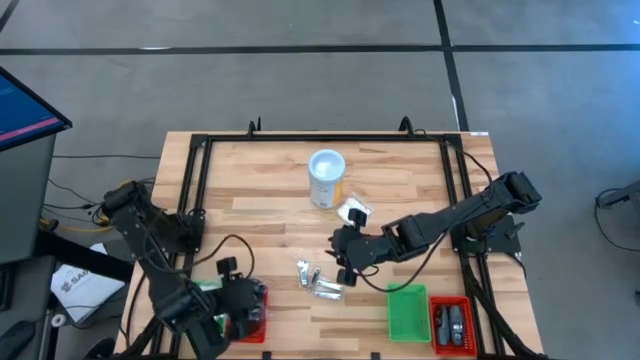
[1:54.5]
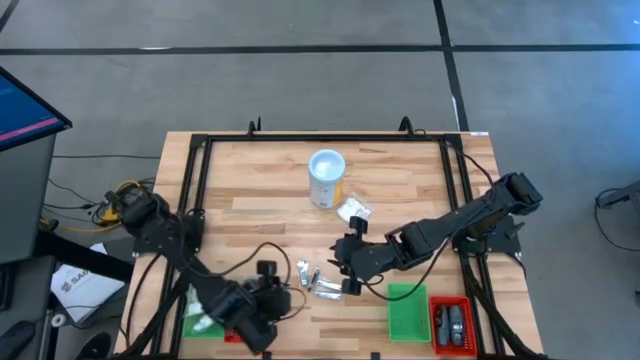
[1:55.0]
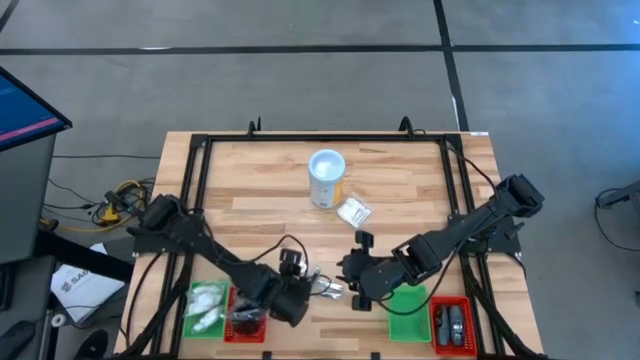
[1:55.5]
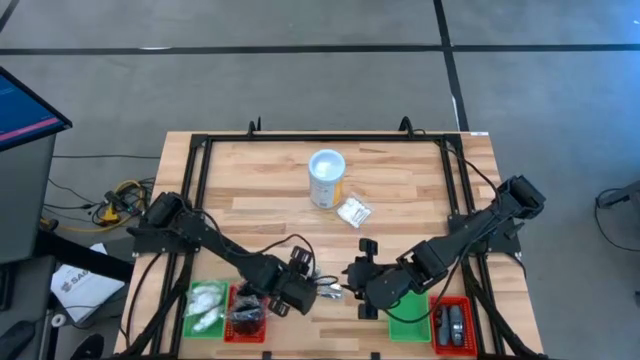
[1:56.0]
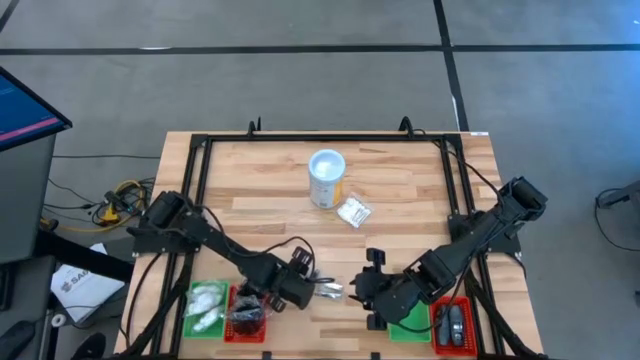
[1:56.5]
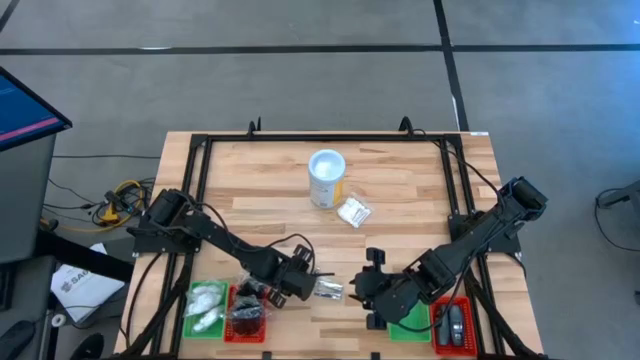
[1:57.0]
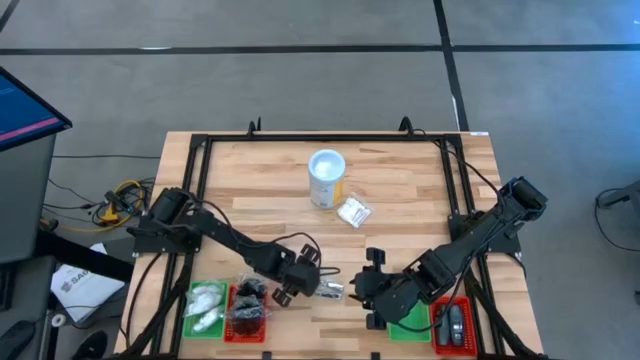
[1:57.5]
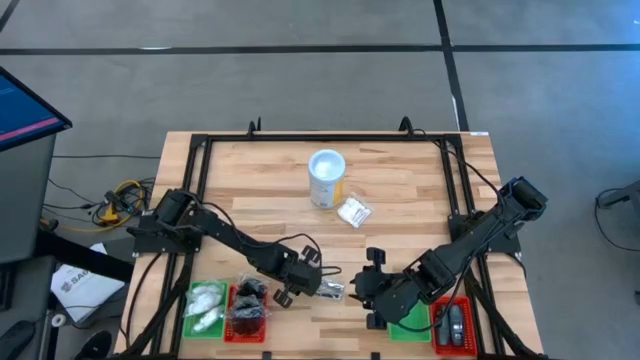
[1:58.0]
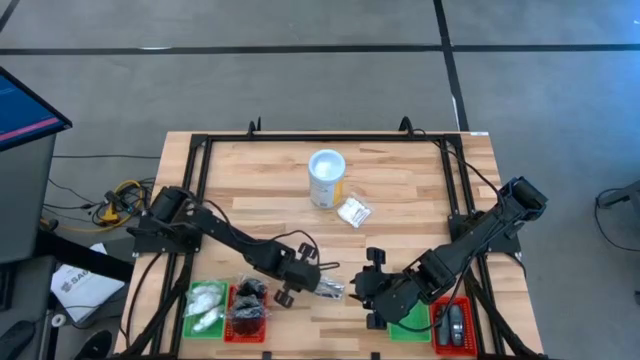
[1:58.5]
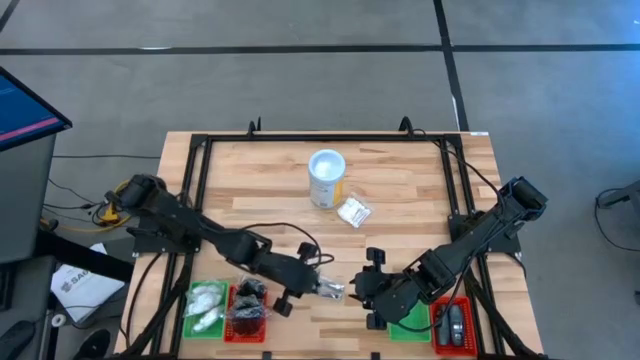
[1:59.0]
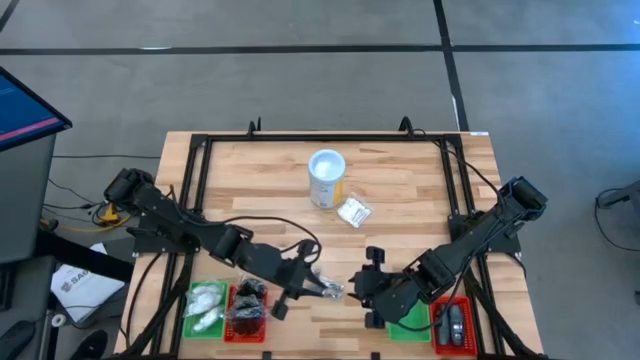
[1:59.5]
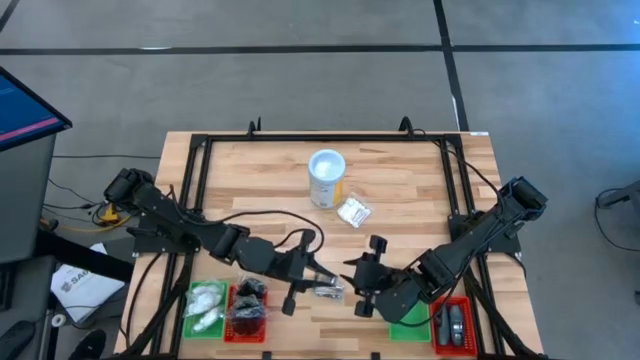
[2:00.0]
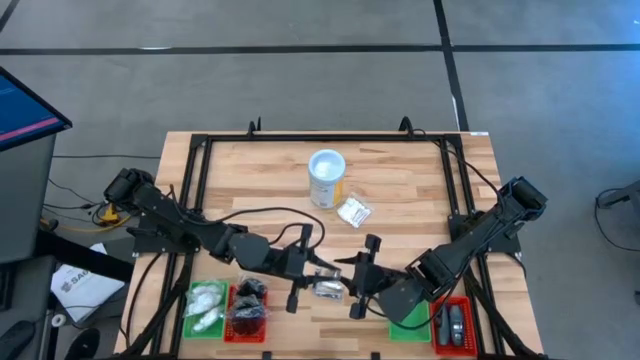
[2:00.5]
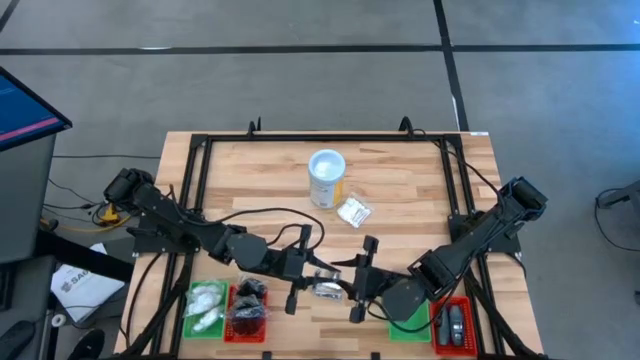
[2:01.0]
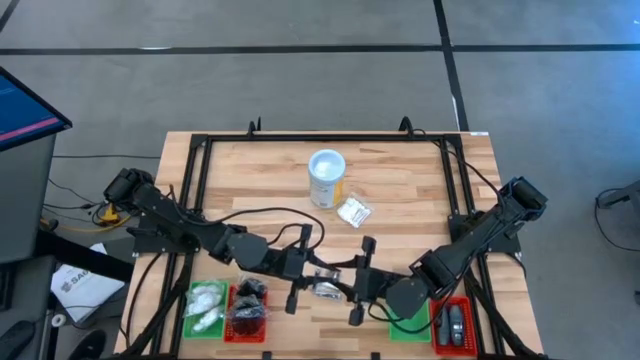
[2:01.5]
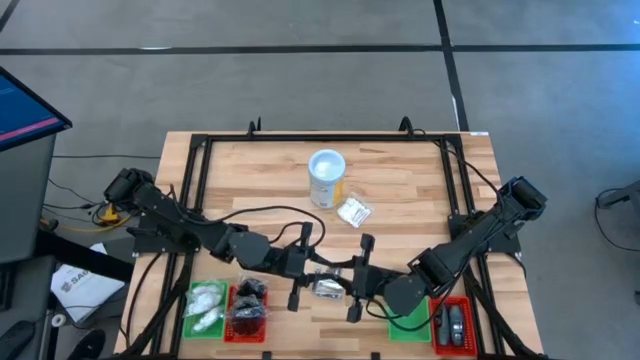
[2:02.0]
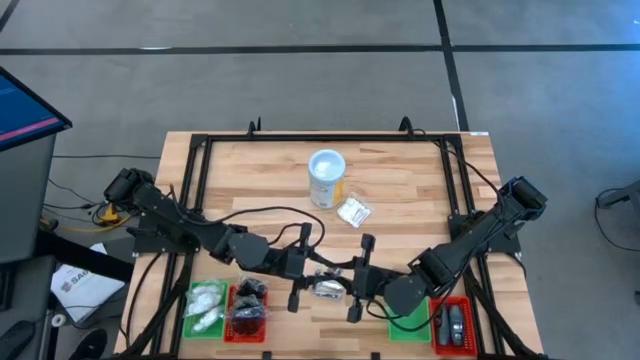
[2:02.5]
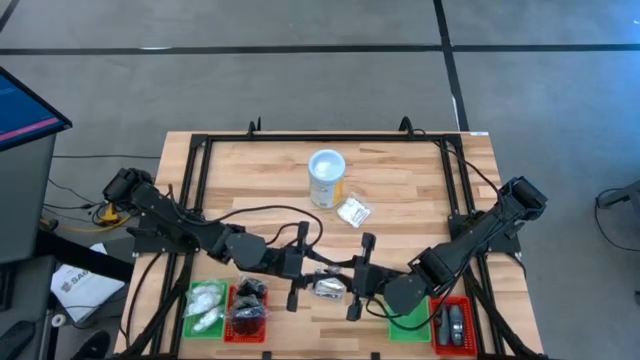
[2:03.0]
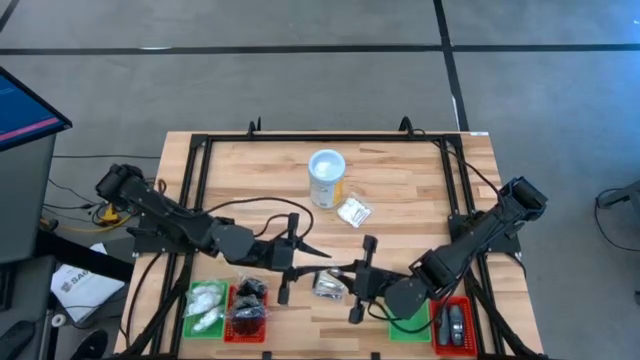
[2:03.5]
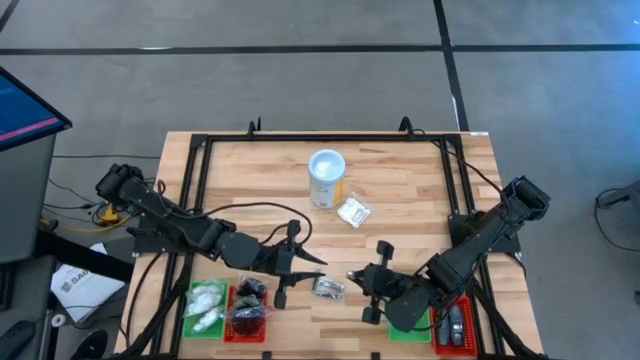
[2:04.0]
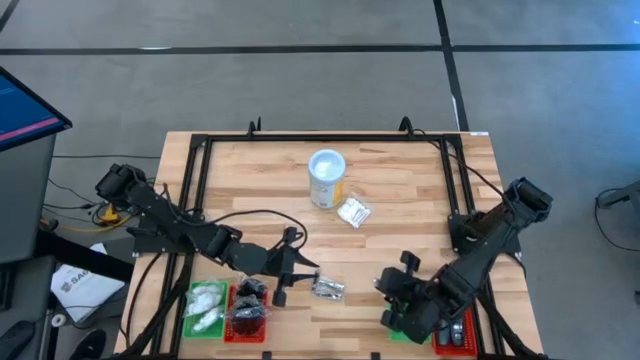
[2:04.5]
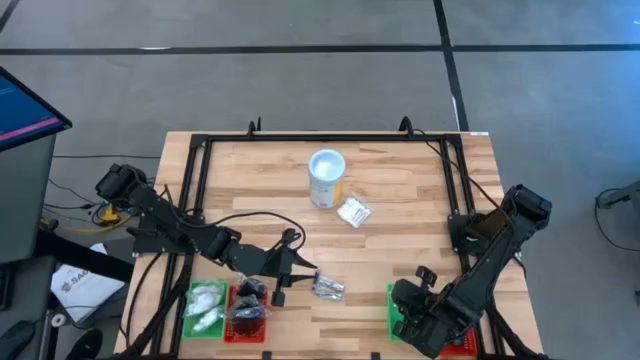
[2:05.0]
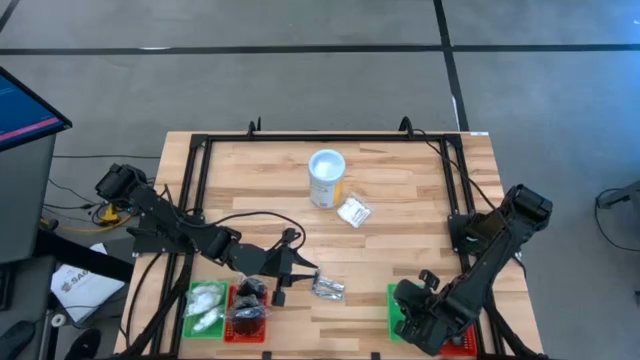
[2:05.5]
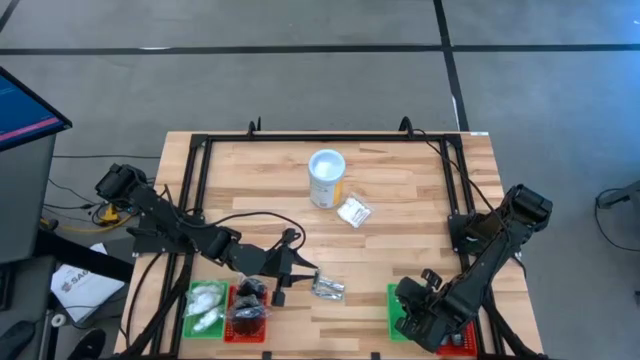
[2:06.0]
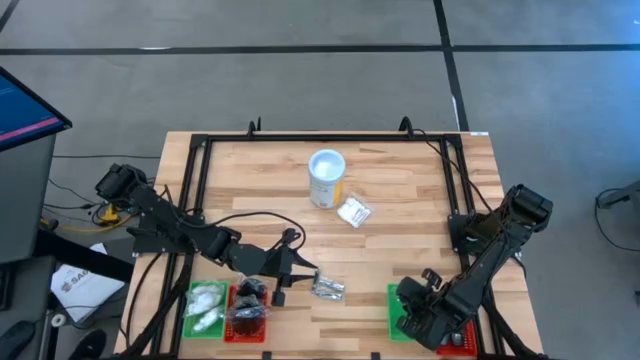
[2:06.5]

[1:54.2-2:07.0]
Task: Pick & Place Travel size toiletries
Put the nail cutter into the right green bin

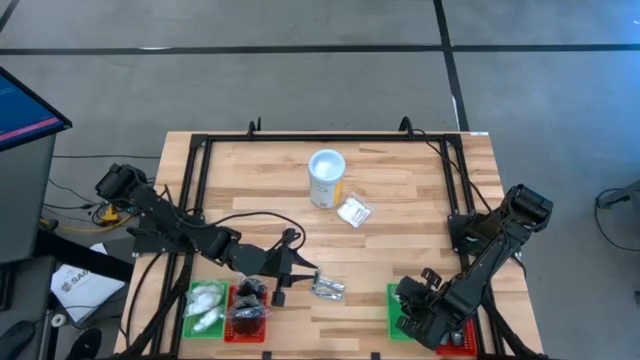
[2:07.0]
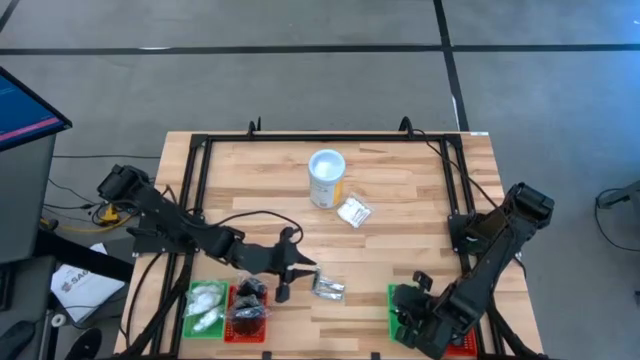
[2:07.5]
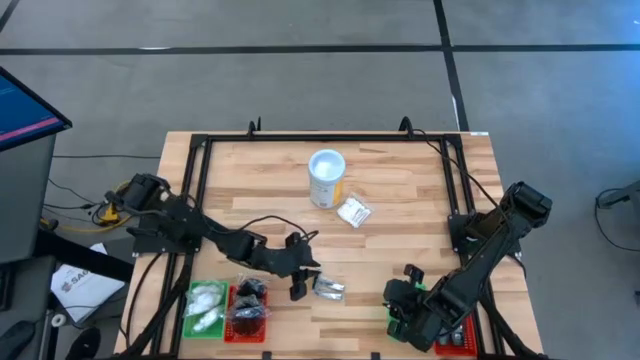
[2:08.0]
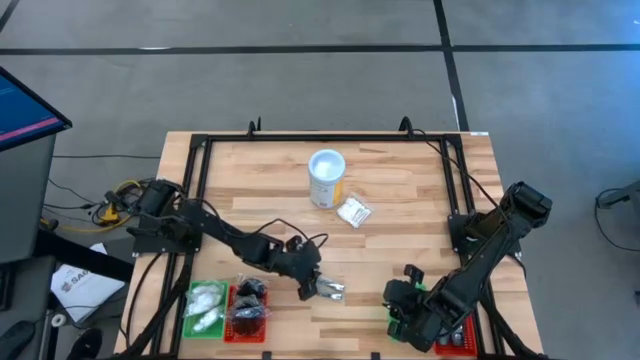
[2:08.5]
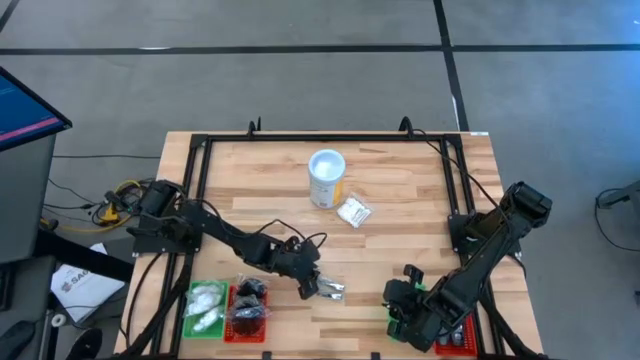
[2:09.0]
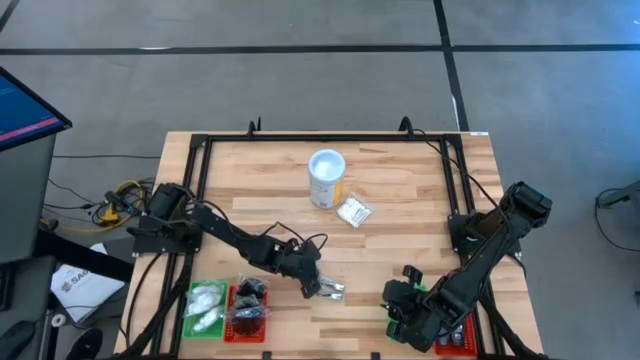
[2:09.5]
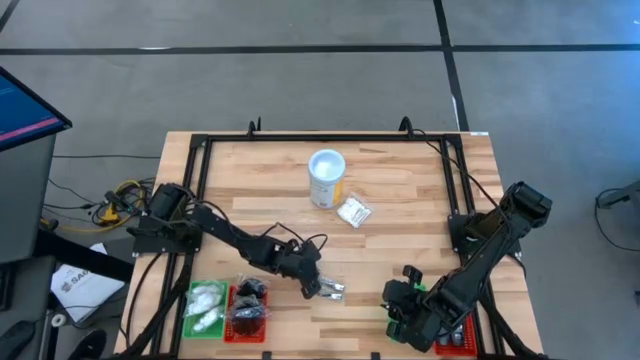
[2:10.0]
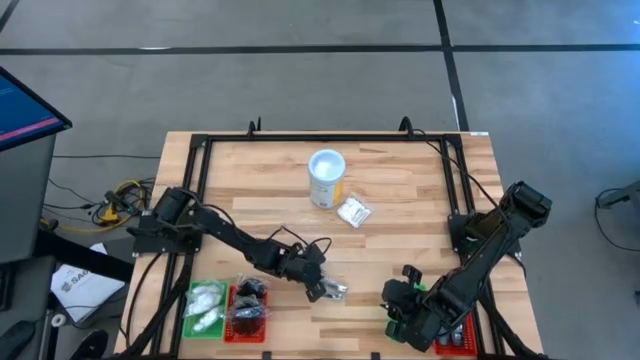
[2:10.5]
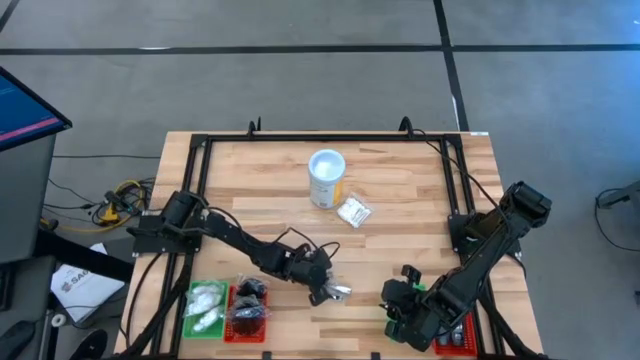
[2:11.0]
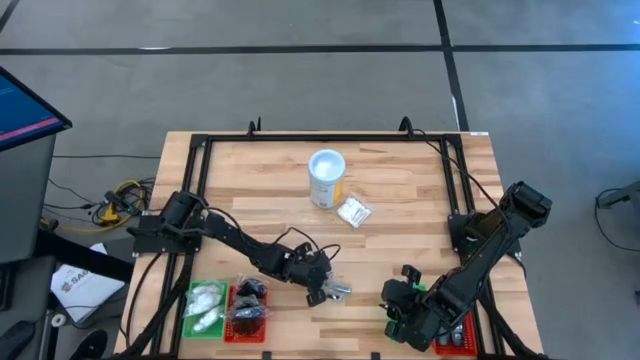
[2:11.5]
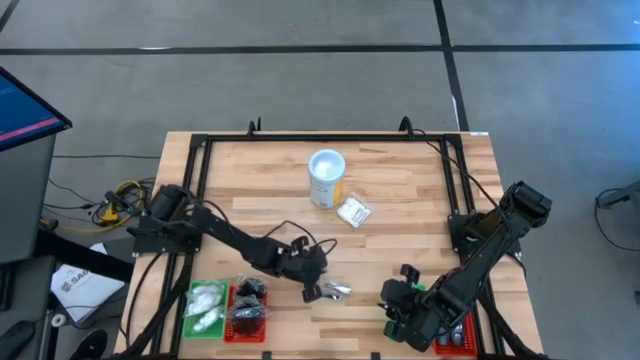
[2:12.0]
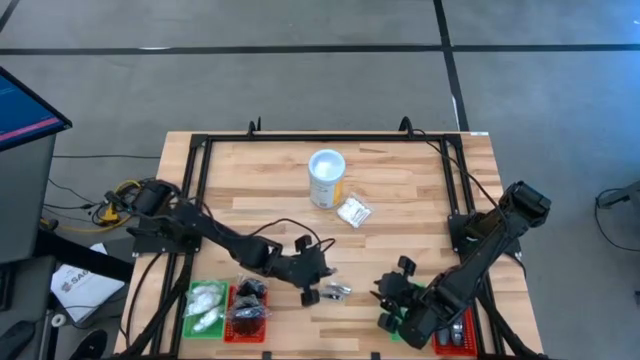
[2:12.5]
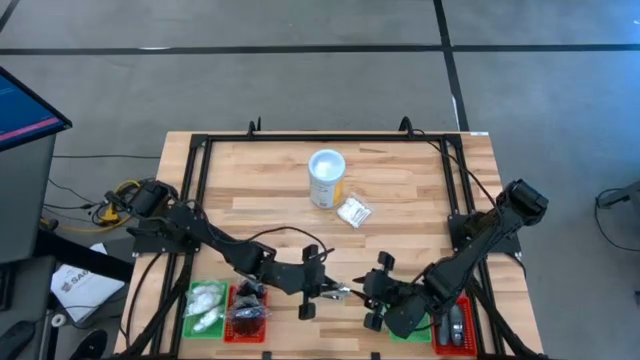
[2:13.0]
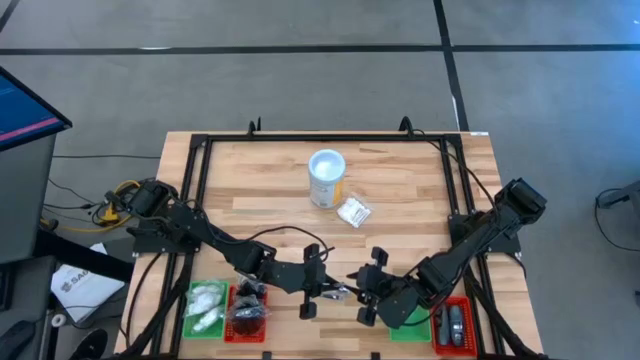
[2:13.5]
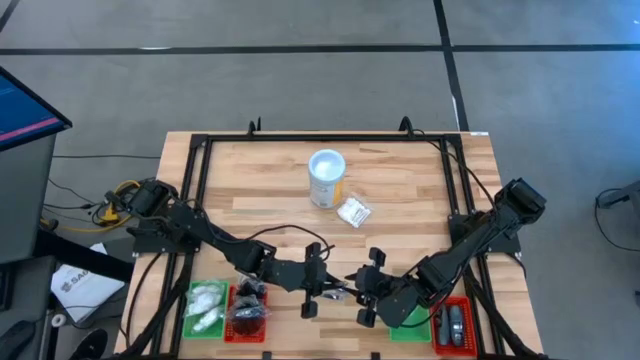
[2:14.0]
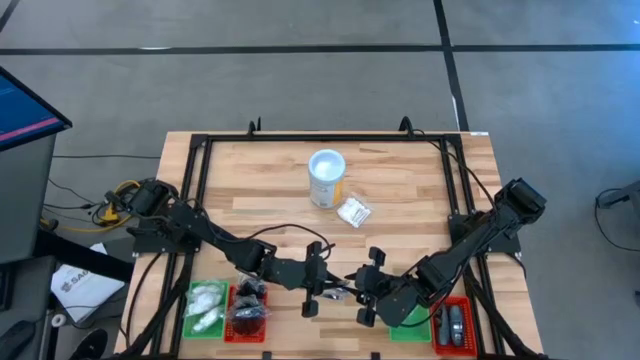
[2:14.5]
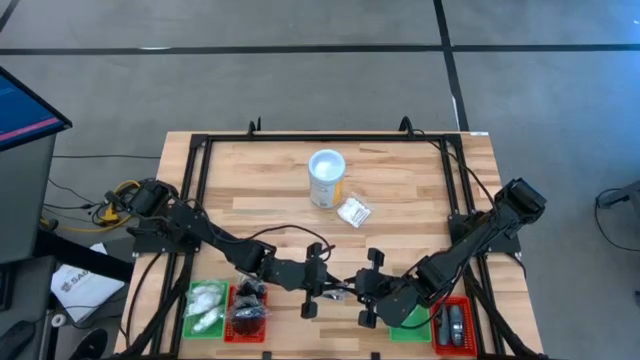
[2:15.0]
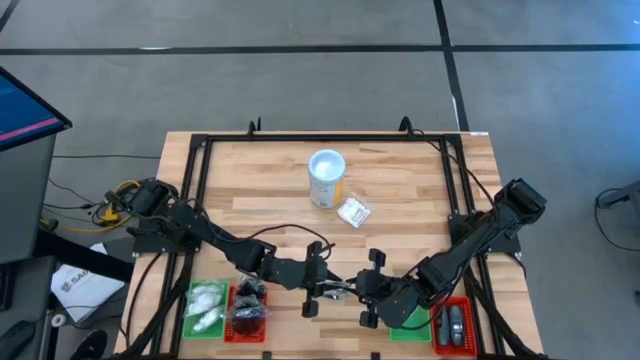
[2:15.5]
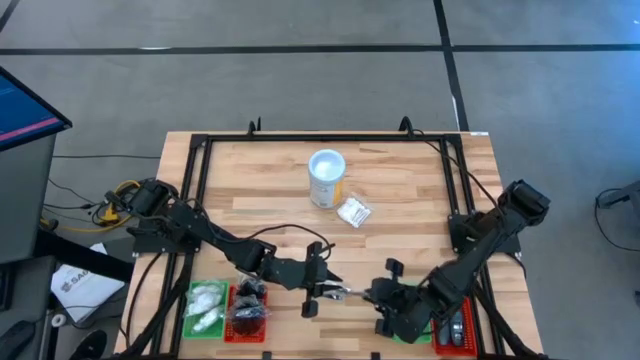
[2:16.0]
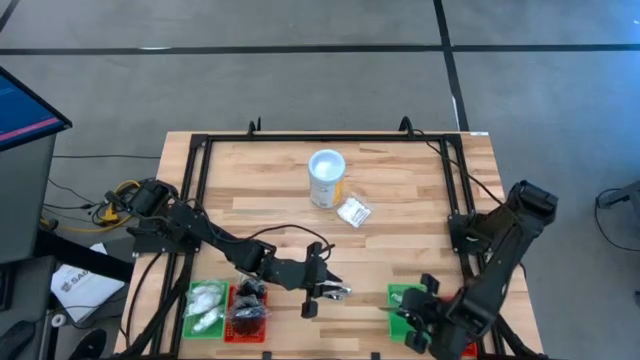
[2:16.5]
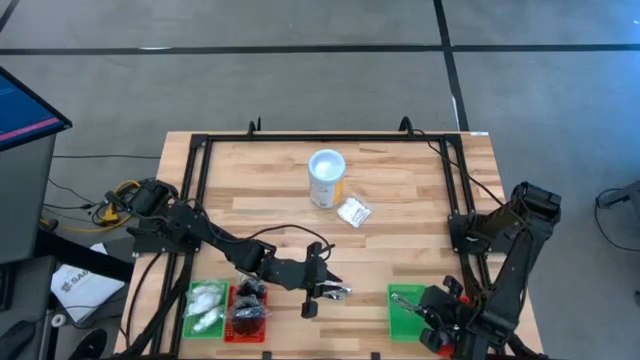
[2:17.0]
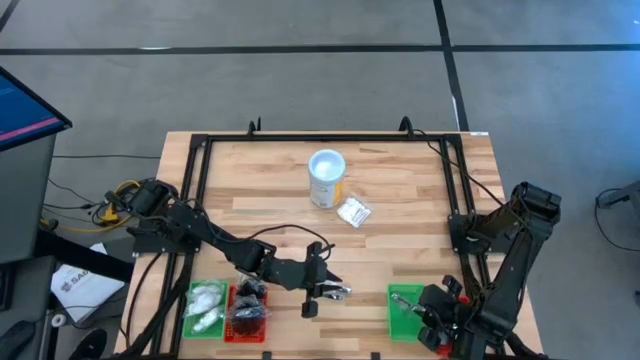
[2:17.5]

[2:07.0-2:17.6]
Put the nail cutter into the right green bin
